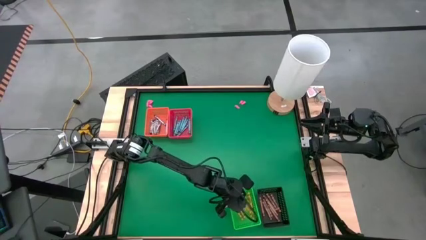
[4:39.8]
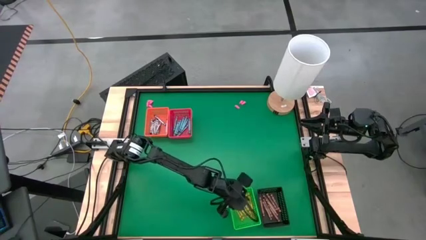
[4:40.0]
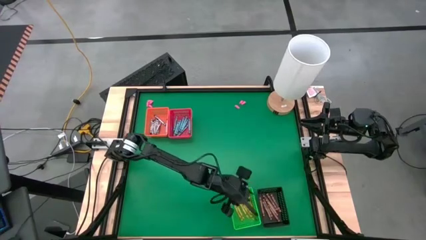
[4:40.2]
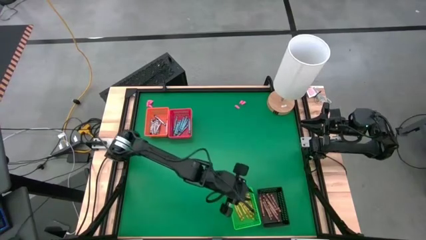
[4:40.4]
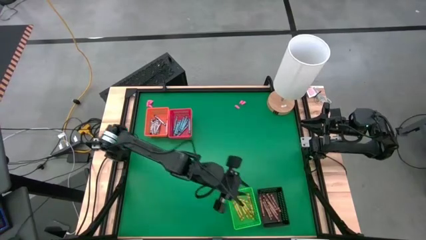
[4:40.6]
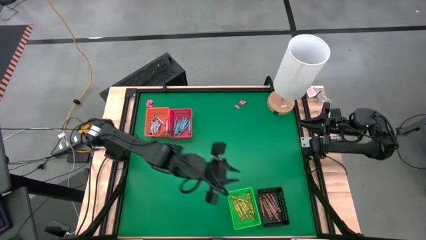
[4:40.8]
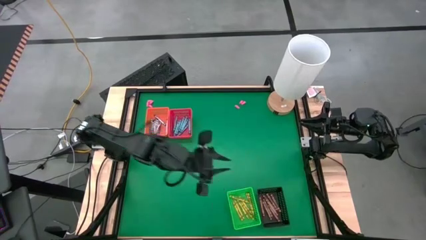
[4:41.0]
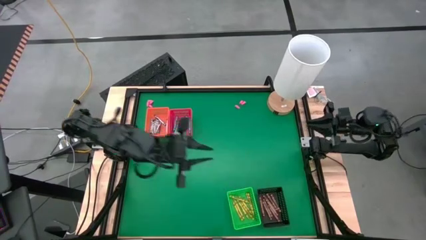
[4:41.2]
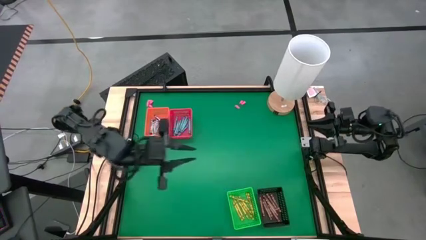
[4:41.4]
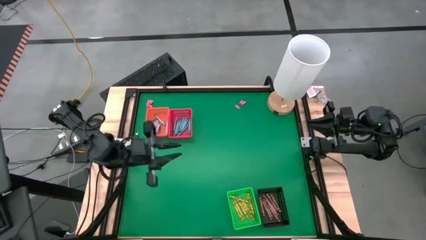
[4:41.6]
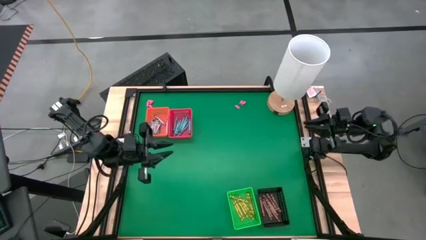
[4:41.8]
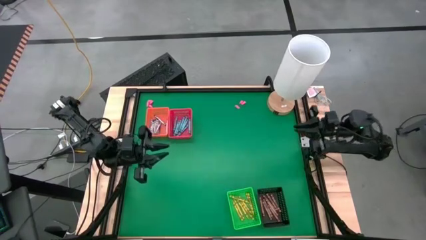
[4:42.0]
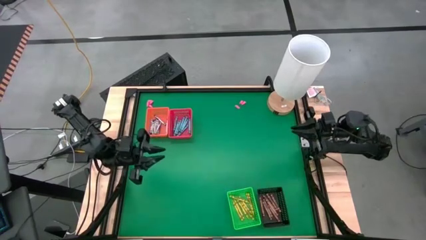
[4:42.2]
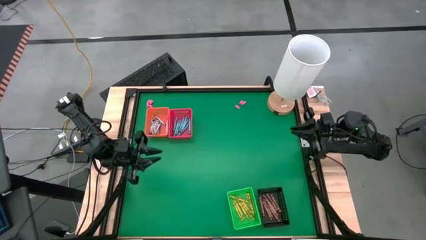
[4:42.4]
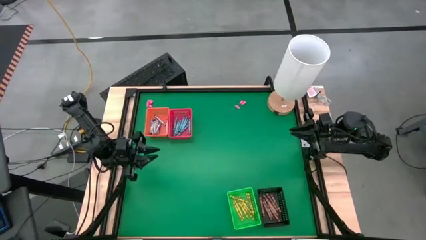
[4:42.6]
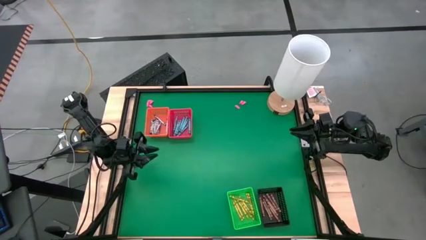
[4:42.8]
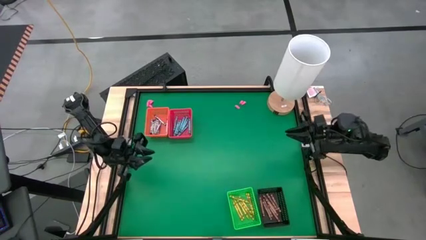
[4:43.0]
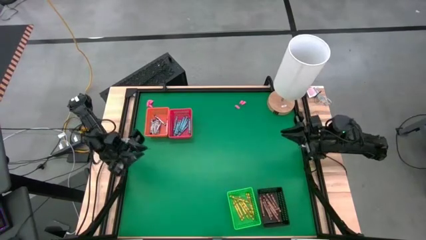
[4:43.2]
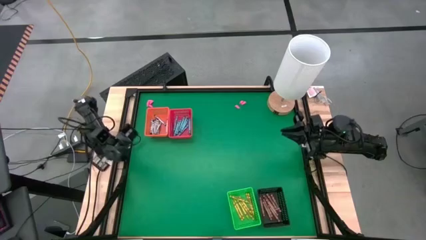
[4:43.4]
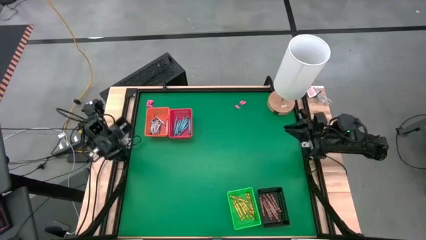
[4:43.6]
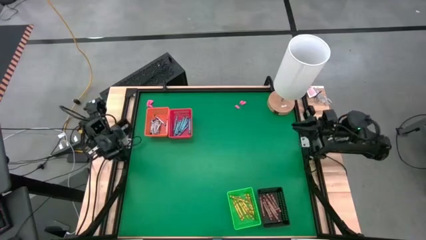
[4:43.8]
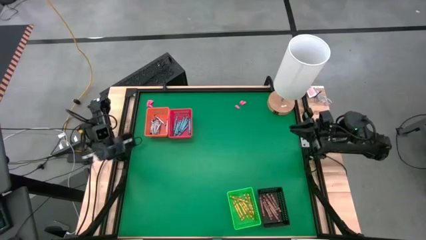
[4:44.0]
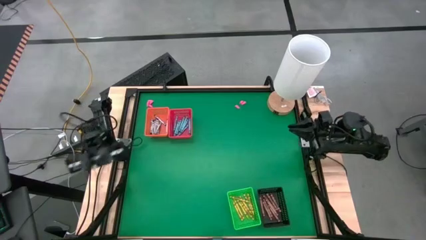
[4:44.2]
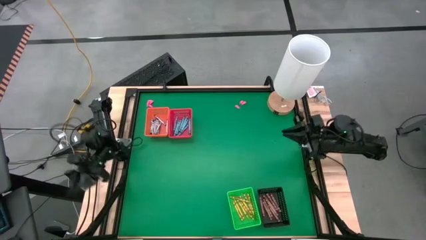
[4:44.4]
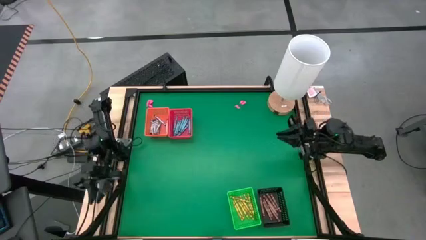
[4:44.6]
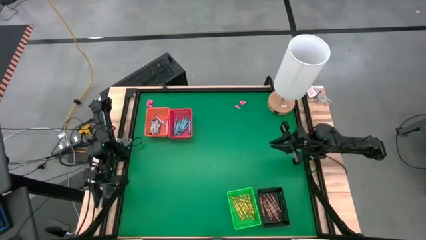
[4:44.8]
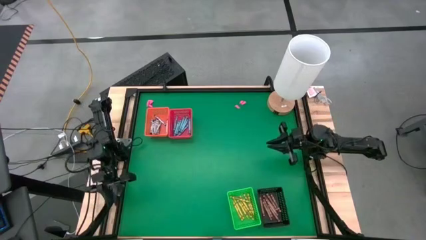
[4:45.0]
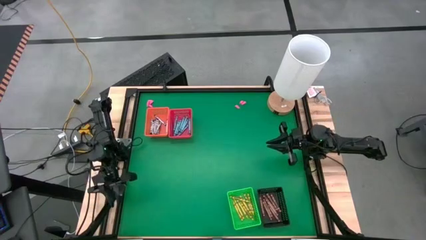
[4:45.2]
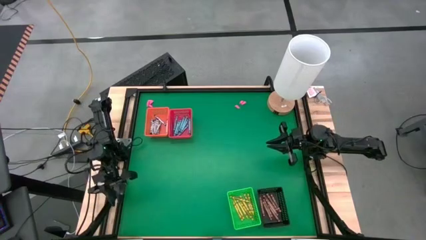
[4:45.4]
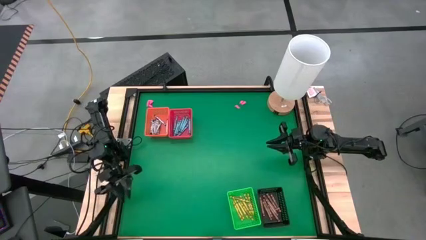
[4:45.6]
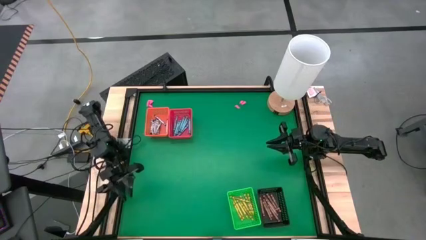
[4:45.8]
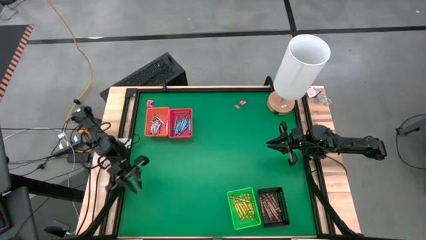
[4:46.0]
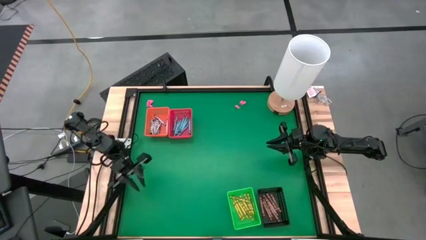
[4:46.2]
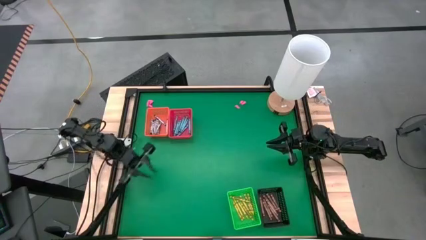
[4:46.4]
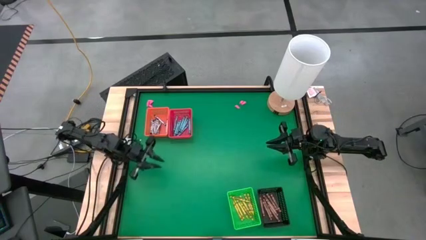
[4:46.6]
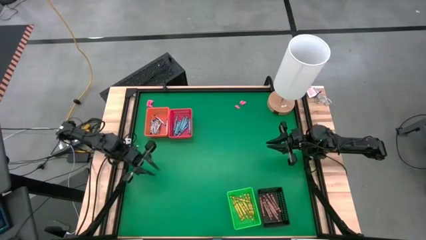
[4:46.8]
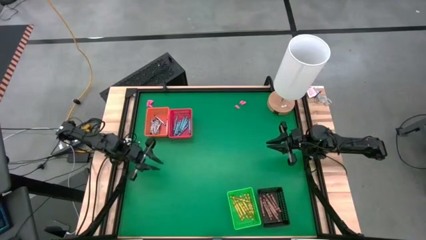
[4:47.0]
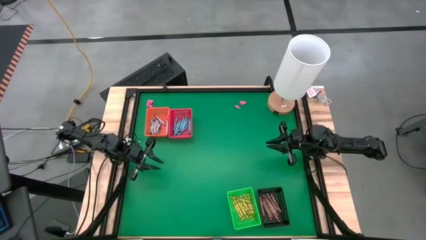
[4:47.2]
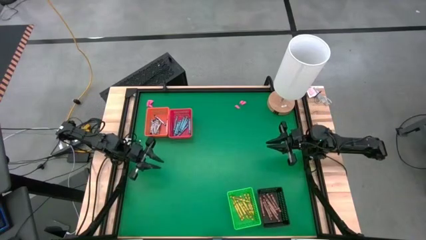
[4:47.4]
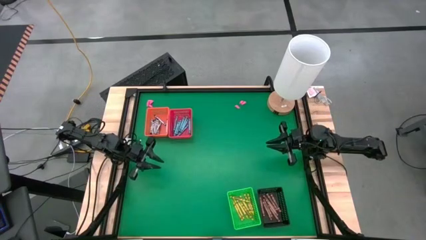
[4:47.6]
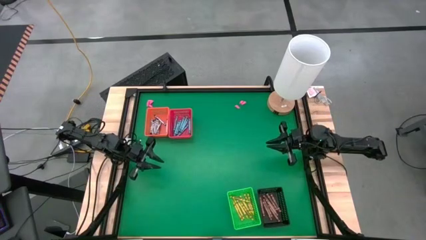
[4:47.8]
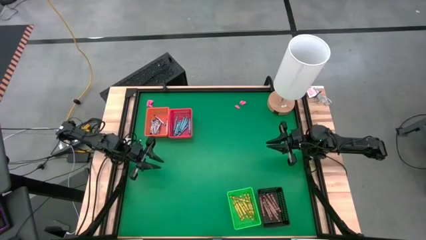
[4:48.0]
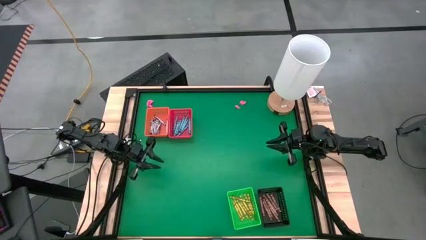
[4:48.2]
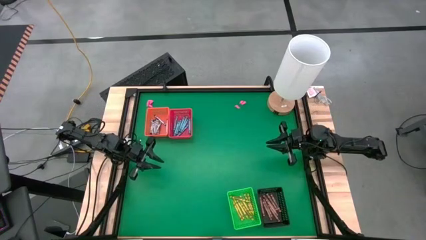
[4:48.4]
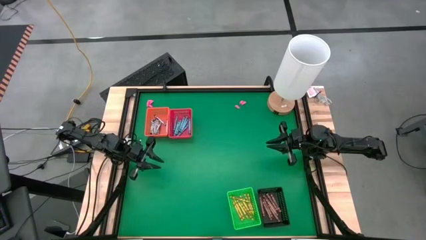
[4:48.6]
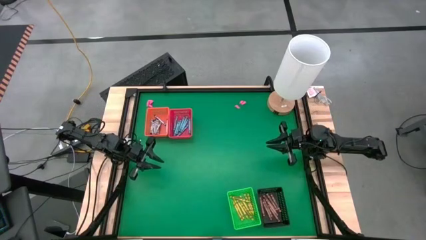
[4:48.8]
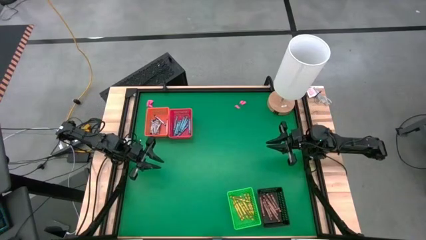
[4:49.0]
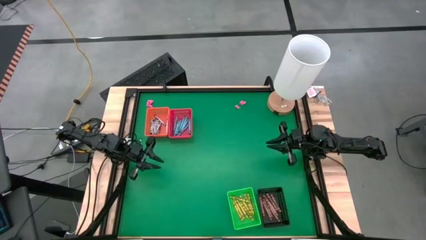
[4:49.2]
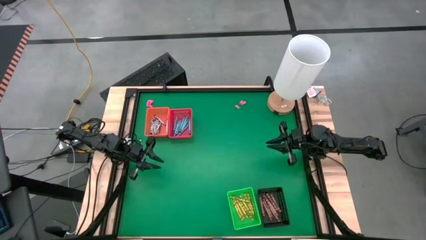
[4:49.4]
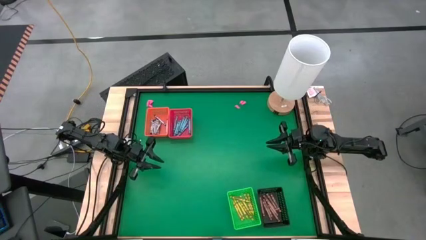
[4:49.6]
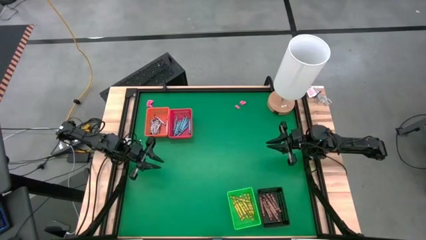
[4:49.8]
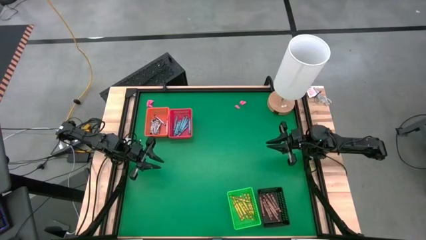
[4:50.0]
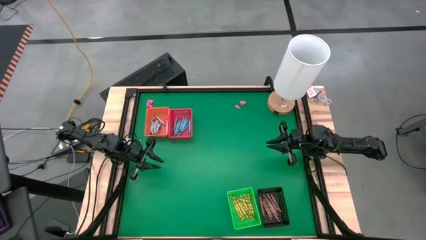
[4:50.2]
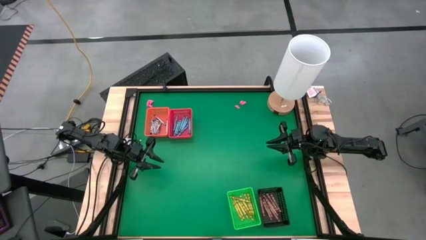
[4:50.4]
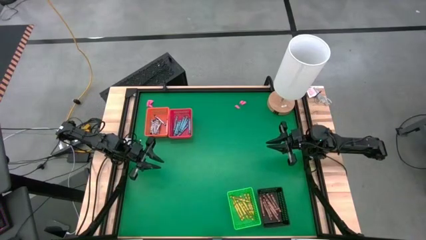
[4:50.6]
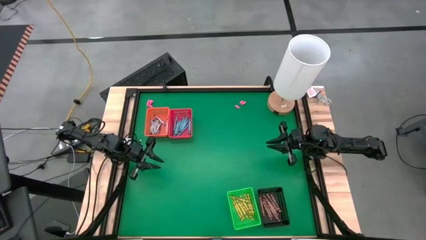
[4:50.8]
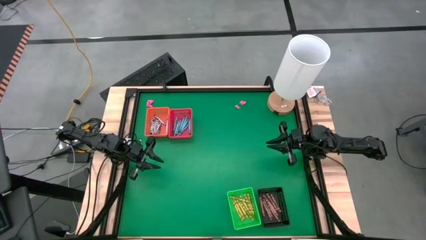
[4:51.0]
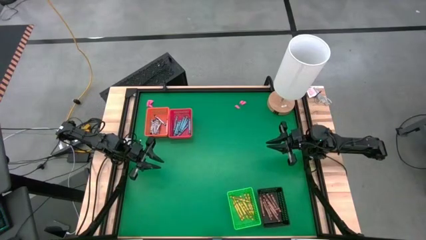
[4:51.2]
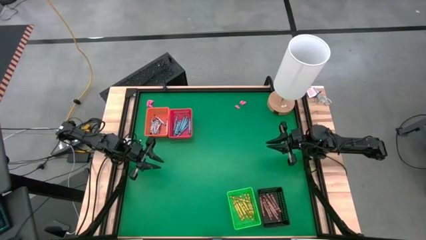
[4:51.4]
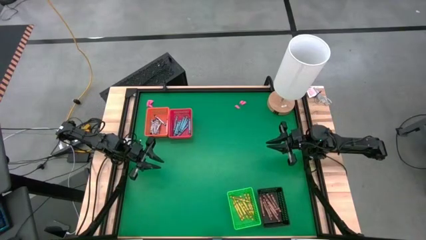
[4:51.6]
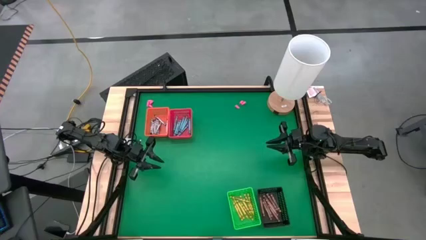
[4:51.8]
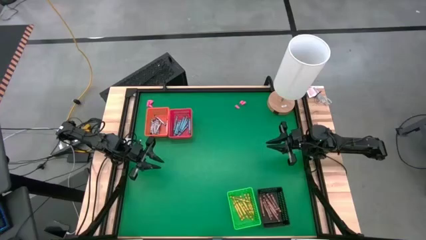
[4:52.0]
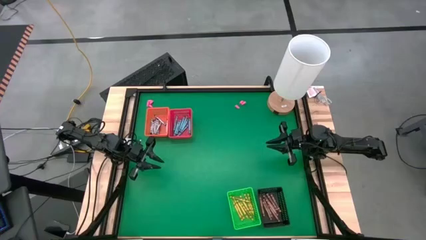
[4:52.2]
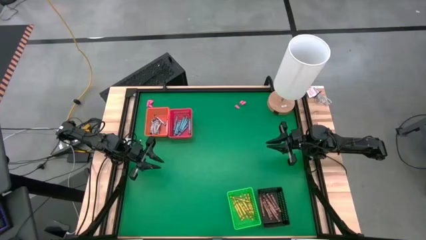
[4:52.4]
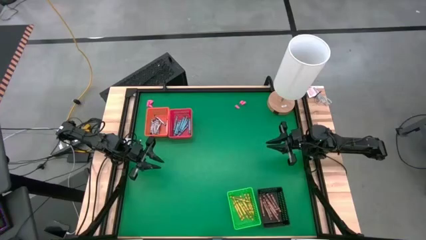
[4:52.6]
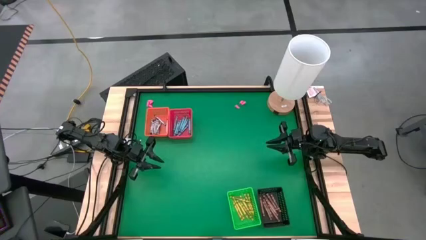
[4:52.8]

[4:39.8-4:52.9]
Task: Sort crayons
Return to Home Position

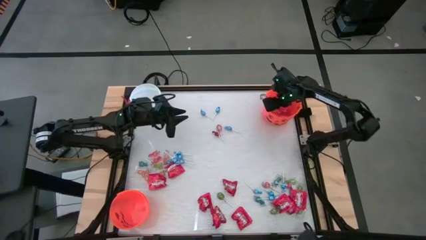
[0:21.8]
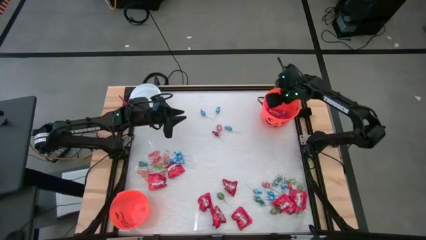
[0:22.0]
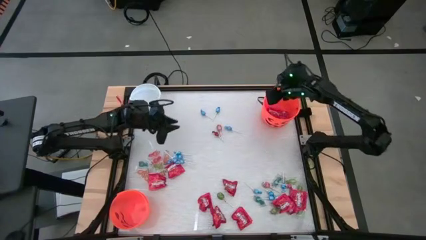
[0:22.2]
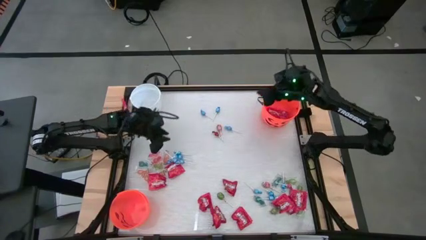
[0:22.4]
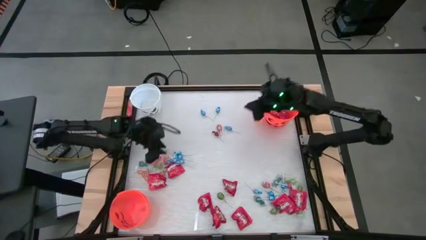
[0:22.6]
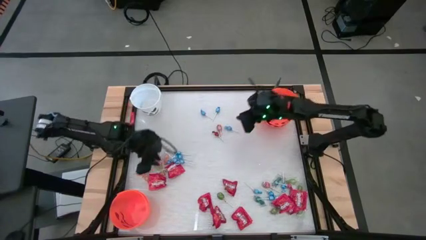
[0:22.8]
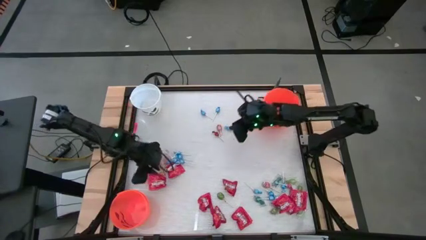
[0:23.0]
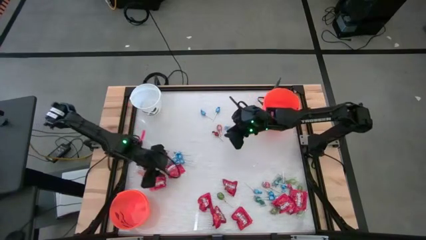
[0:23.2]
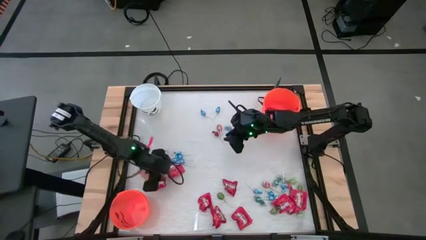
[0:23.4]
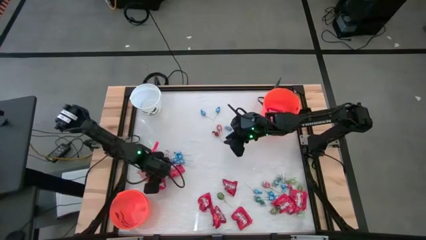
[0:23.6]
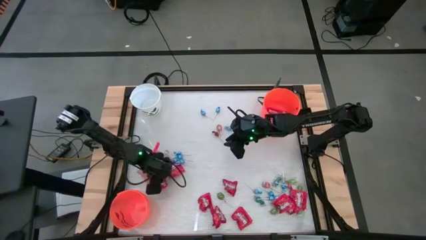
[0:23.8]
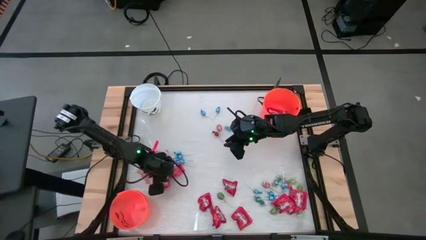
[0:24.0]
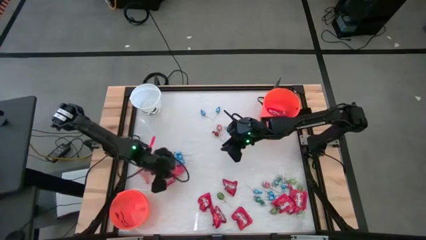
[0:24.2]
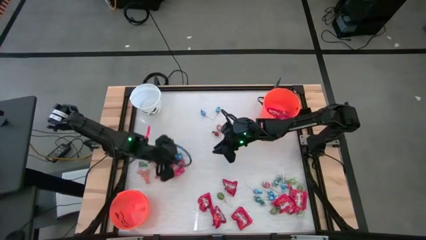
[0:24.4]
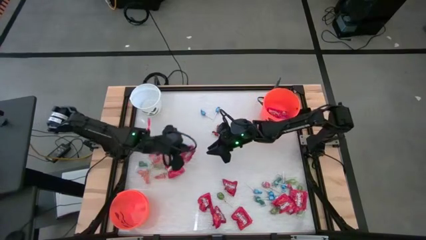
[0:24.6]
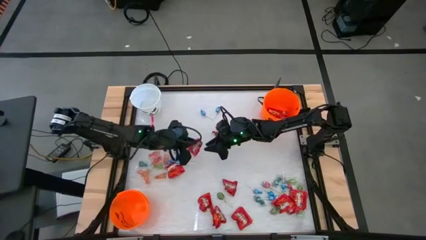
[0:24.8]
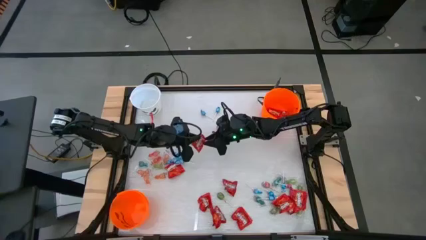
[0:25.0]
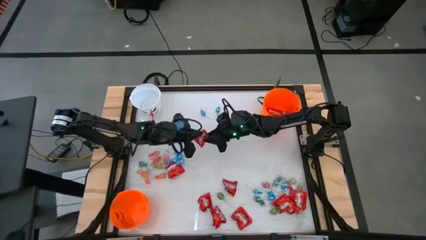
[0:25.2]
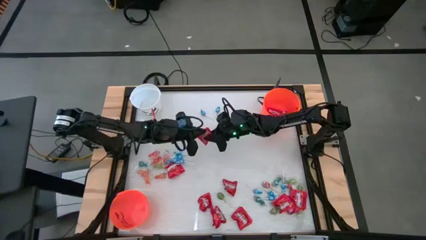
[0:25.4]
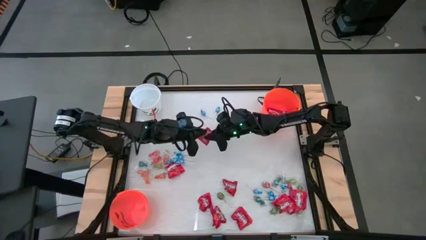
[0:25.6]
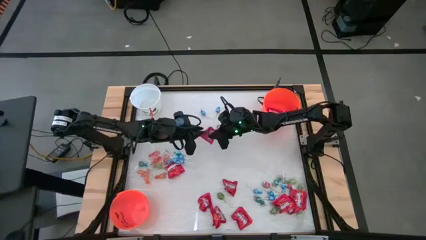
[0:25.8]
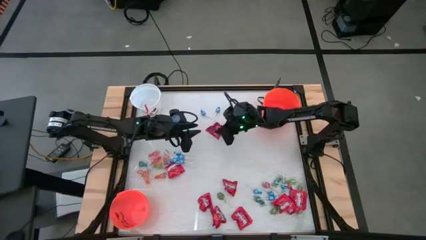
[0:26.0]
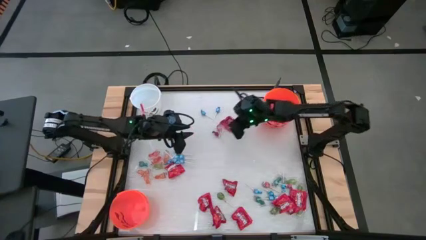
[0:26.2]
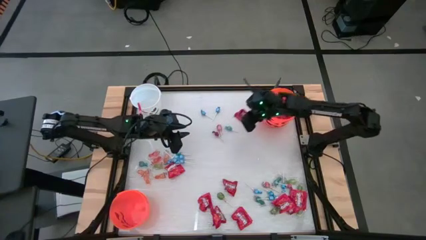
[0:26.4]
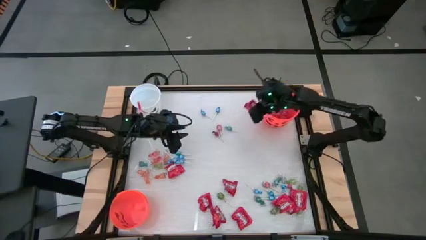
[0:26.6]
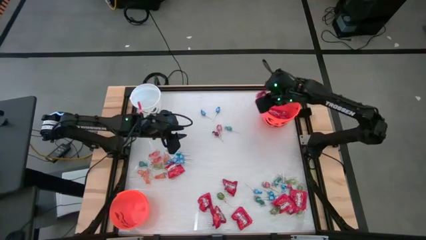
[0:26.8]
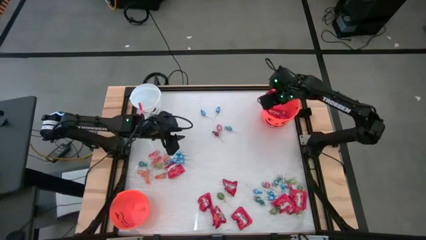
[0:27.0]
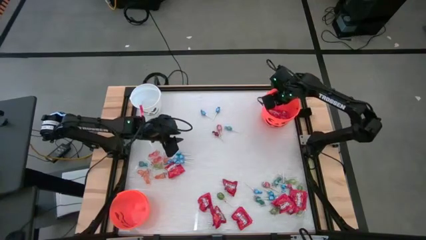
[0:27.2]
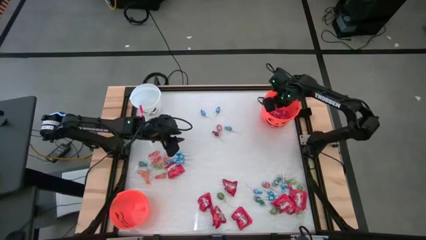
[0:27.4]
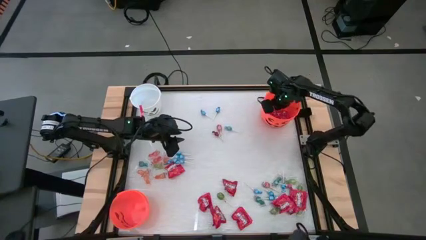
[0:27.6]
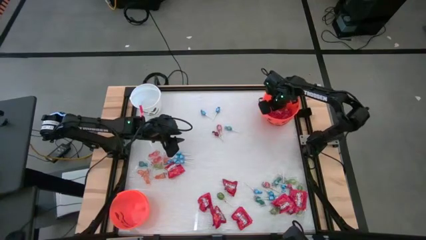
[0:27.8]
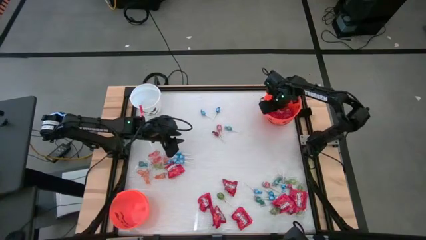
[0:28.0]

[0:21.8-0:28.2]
Task: Sort candy by brand, put in halloween buckets
Put the red candy into the top orange bucket
